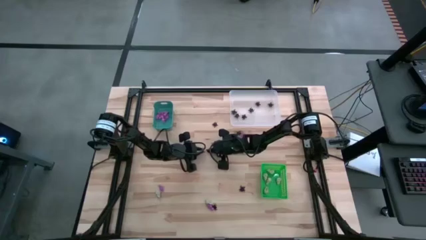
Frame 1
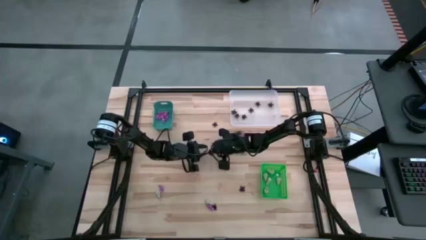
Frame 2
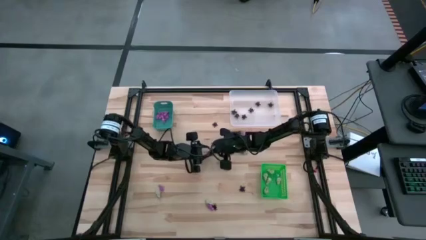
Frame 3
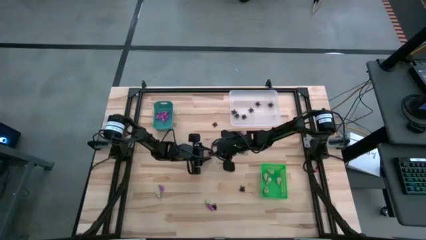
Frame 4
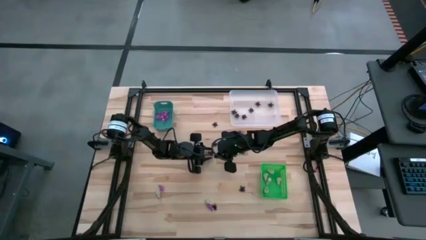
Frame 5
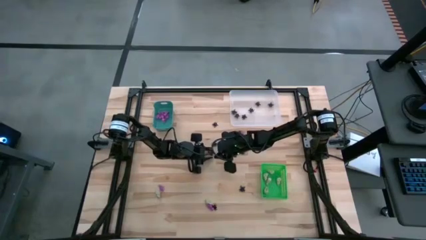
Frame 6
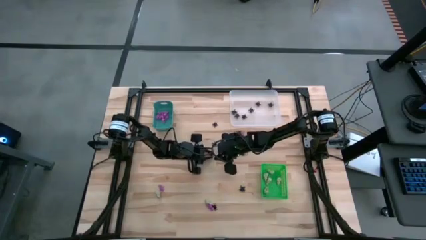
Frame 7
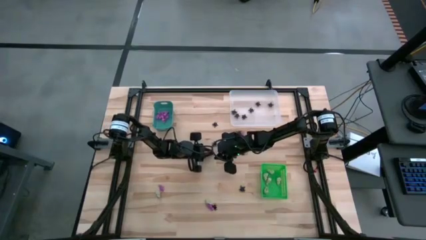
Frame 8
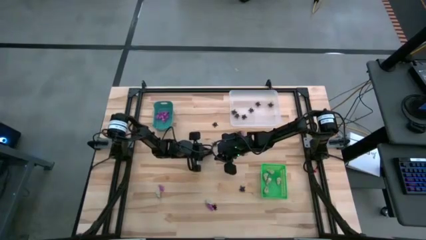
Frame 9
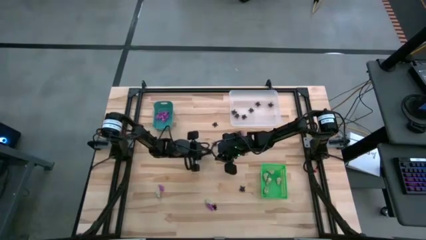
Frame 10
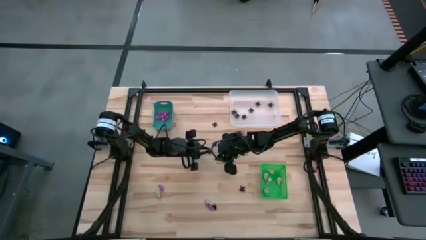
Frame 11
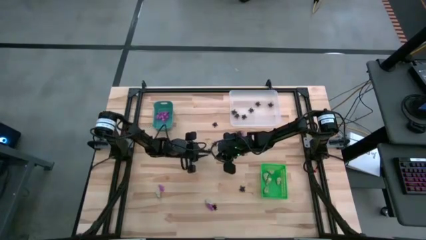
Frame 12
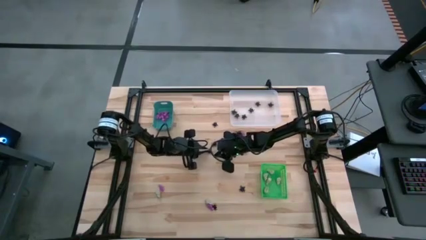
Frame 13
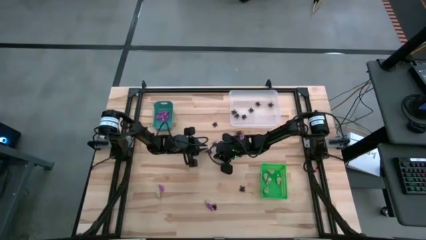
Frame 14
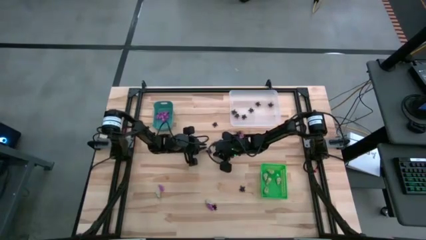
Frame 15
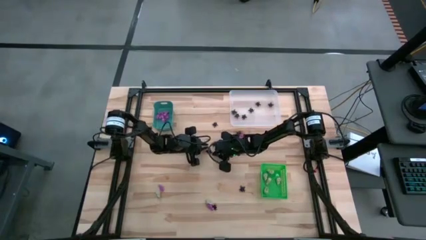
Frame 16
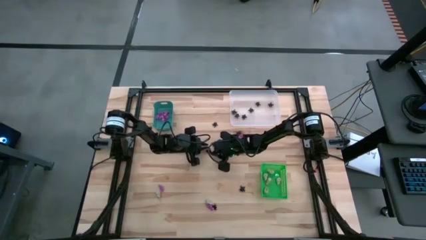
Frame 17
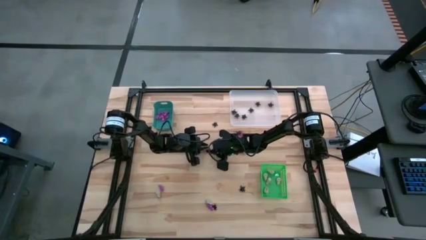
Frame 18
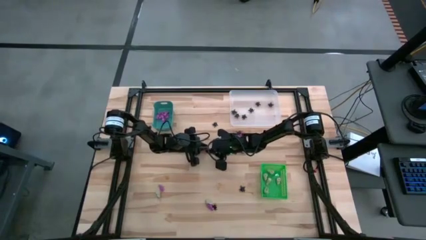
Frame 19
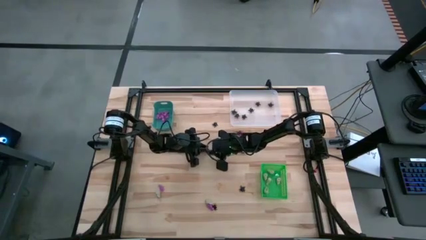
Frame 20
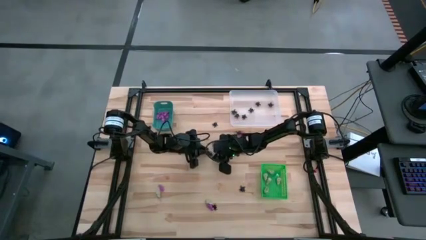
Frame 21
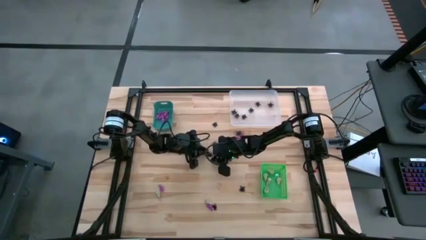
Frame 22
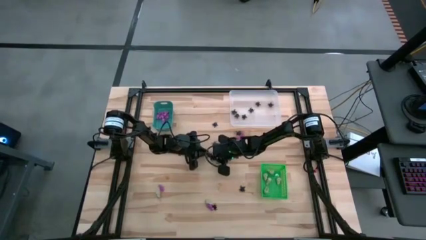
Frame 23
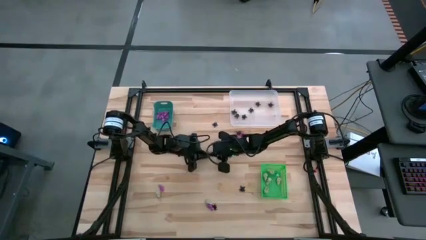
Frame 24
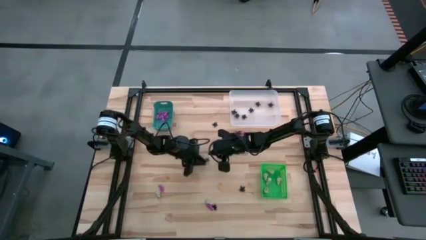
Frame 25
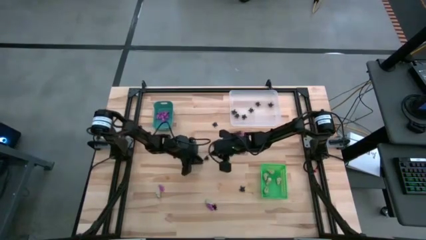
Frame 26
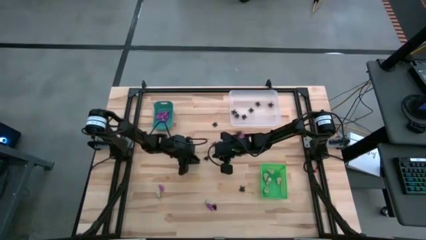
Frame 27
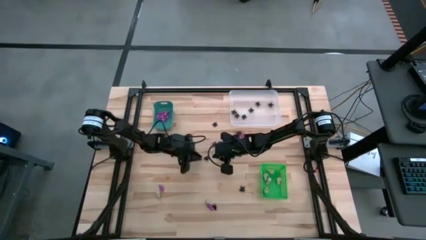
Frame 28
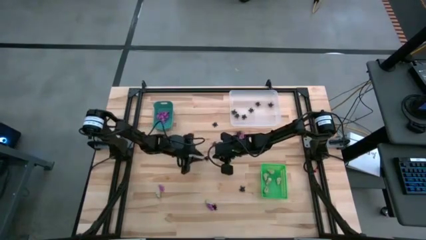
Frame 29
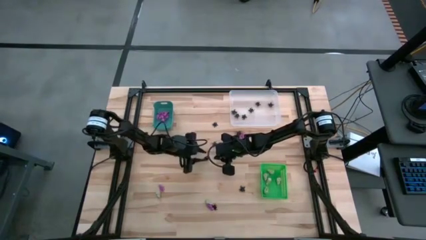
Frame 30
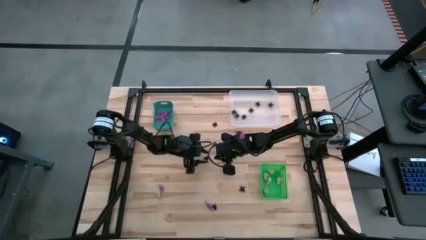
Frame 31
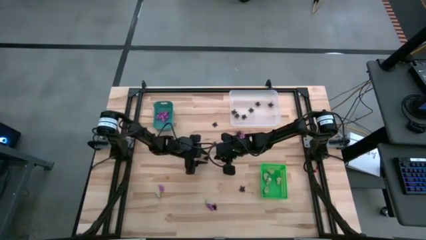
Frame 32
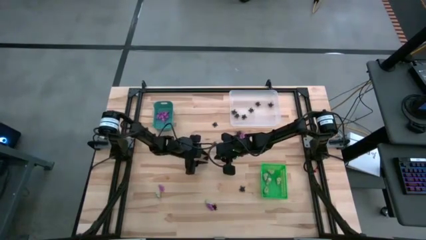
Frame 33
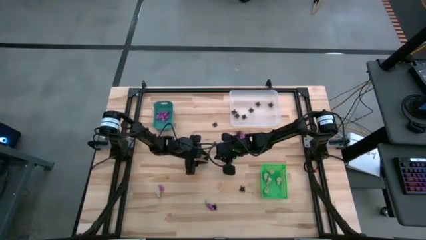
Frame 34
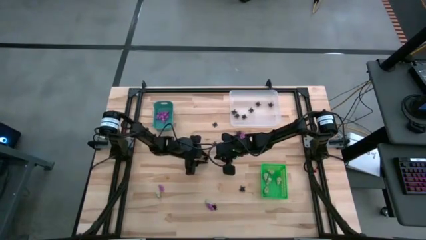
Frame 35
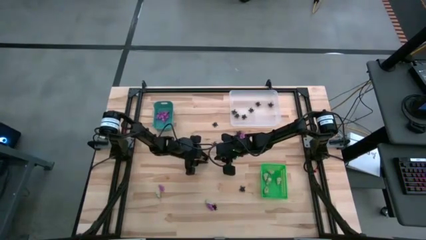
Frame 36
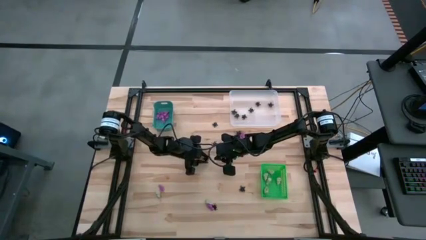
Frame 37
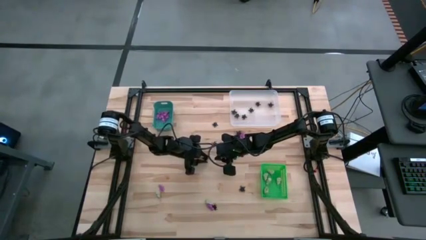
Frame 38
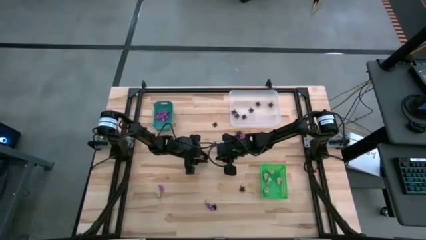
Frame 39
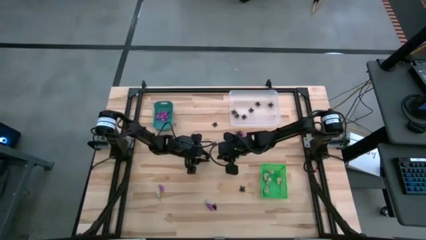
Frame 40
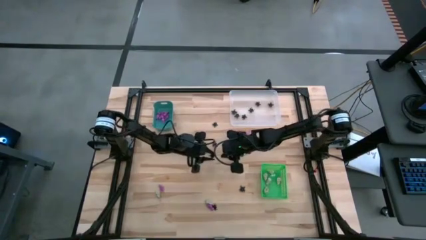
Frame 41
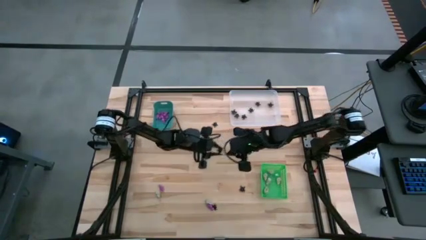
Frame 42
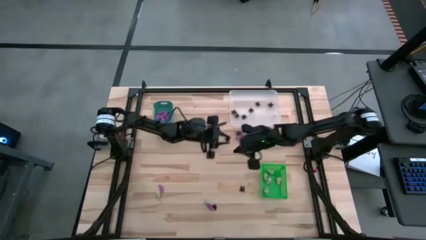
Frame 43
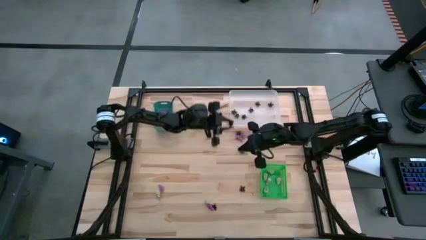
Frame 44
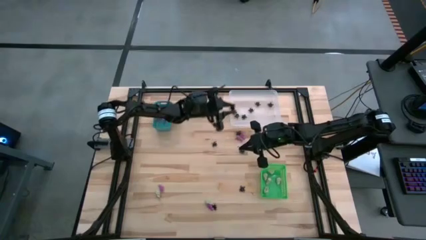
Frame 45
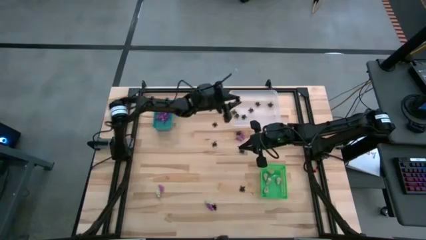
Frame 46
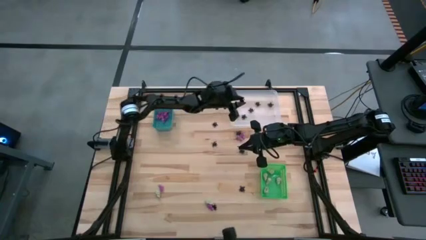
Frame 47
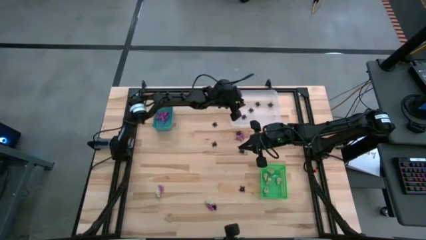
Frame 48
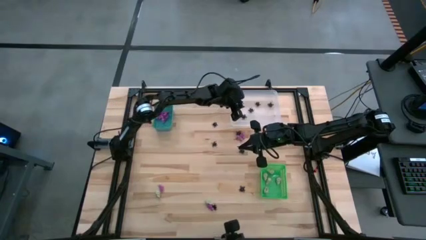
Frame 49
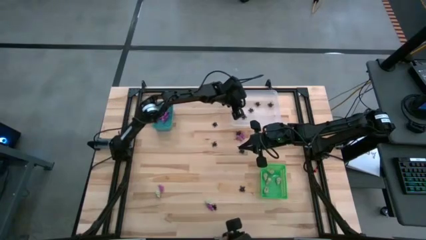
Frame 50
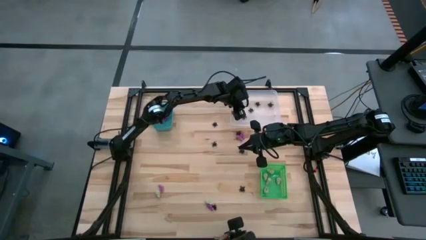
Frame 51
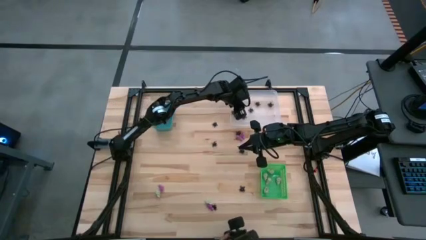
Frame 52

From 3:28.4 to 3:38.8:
Task: Sort Halloween decoration
Put the black spider toy into the white bin
